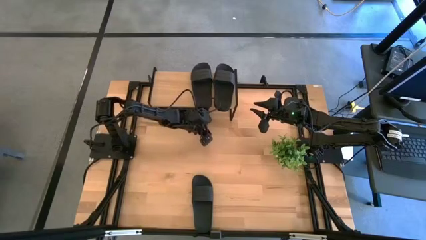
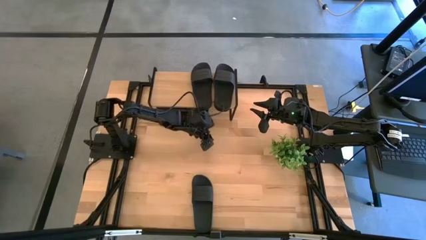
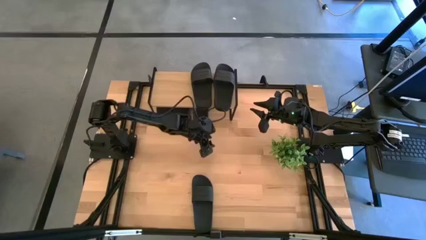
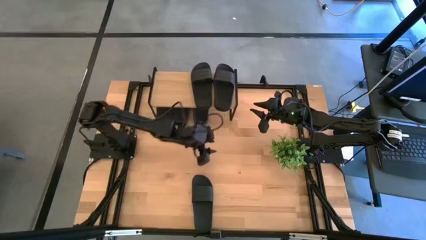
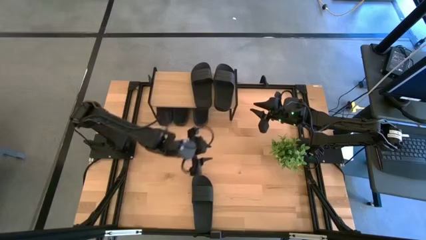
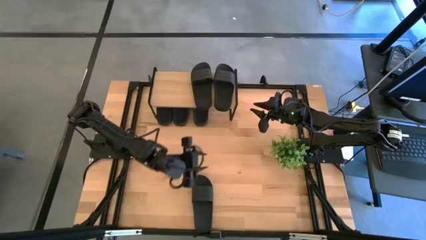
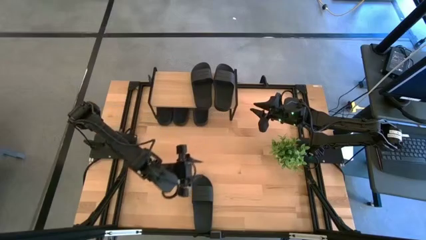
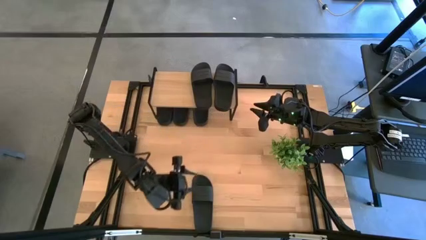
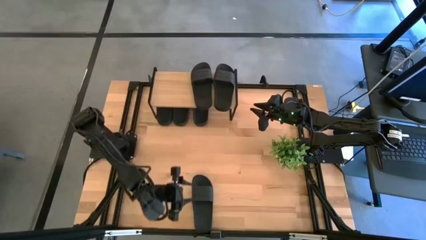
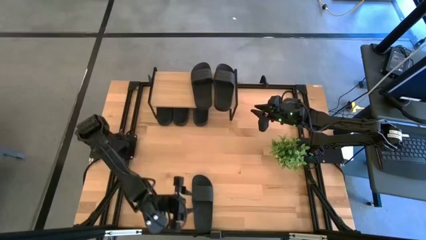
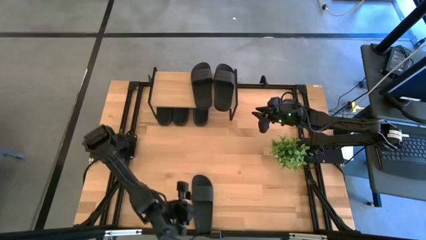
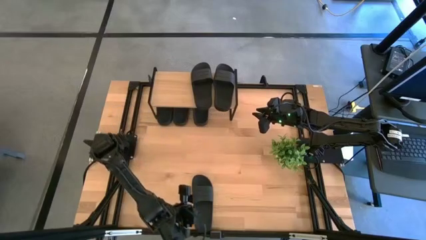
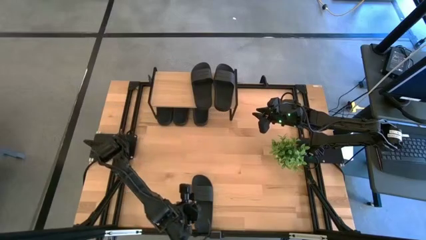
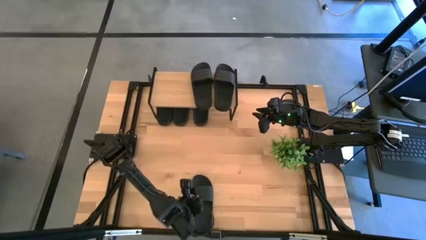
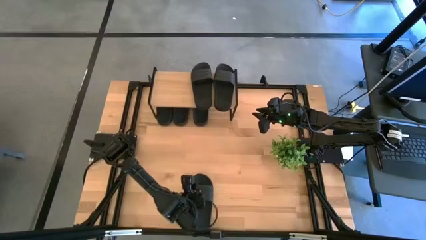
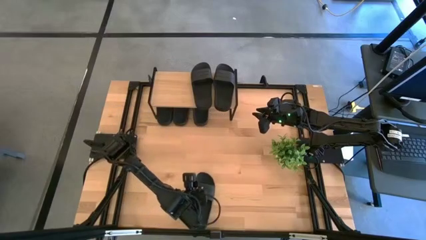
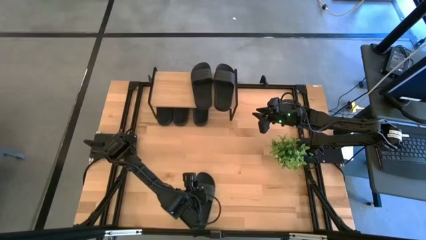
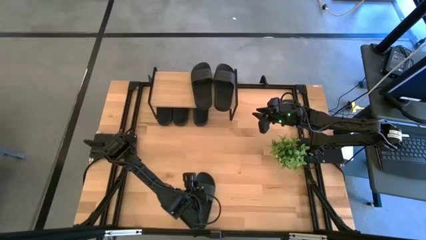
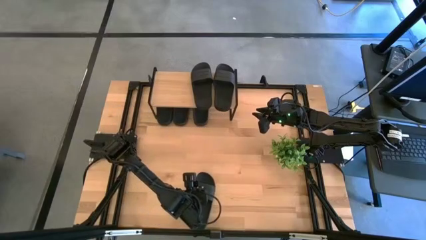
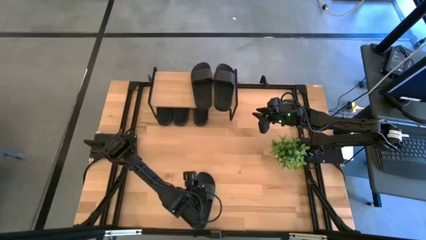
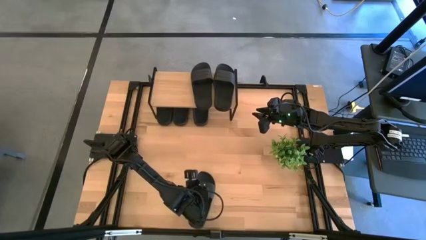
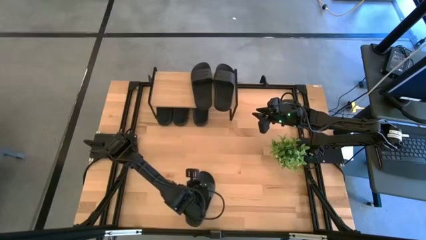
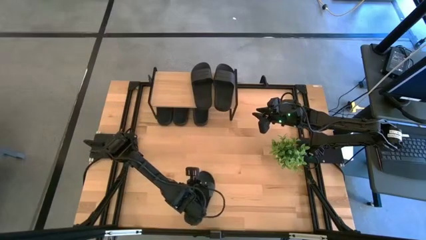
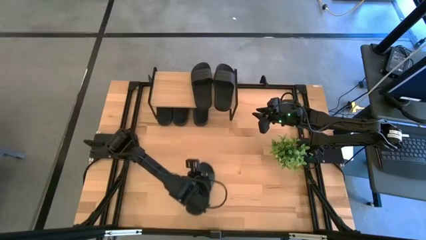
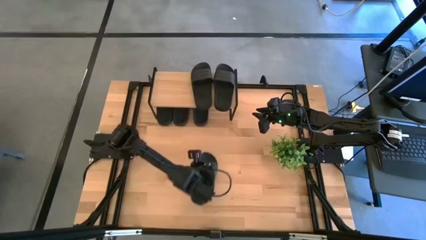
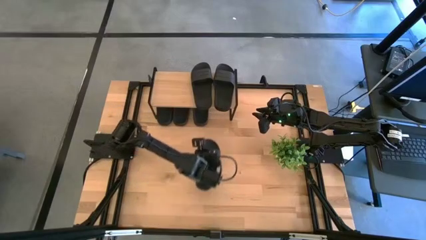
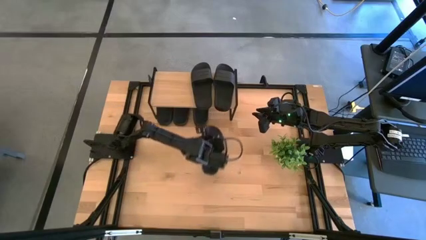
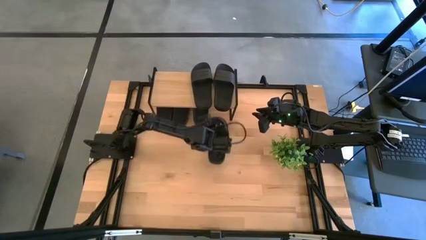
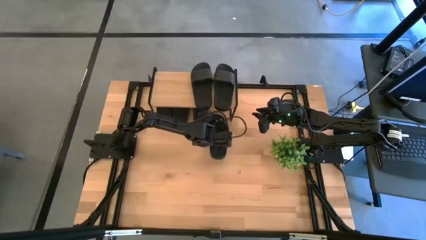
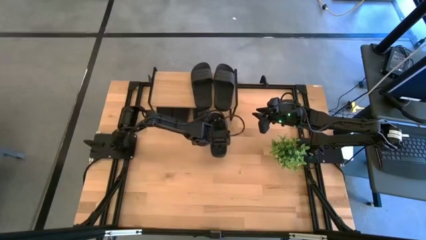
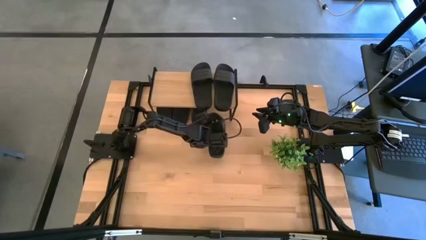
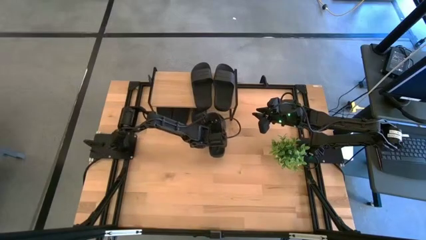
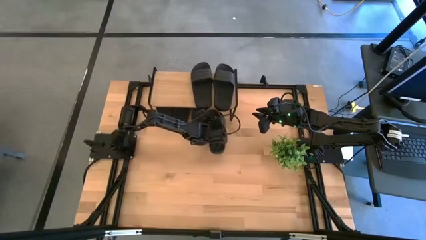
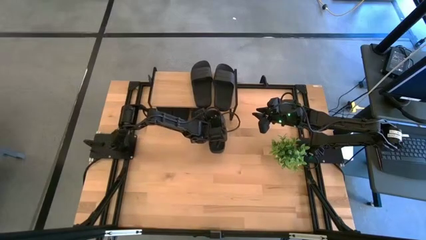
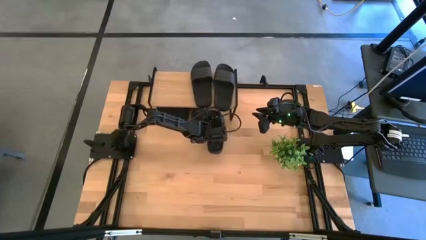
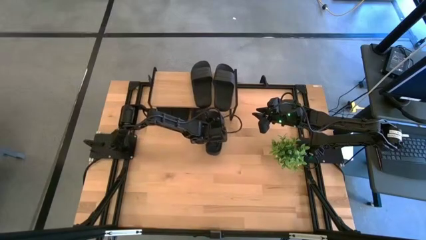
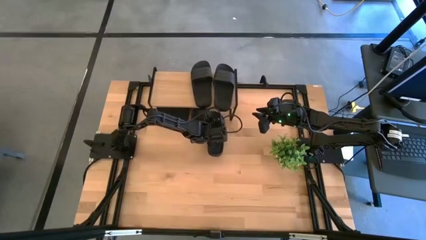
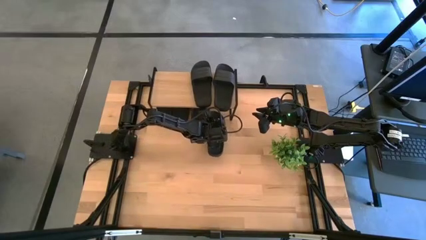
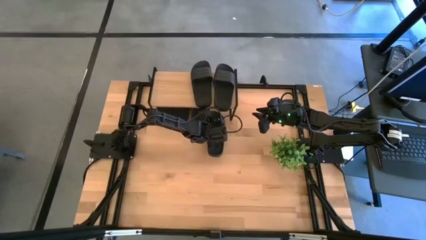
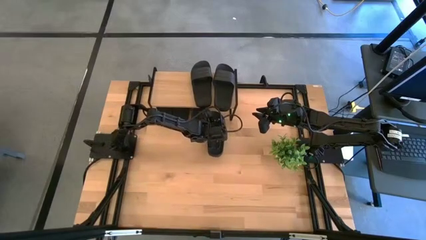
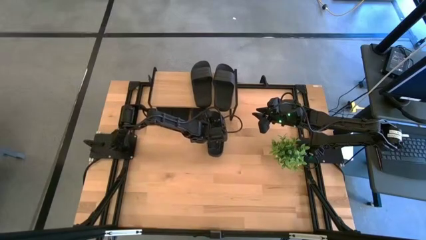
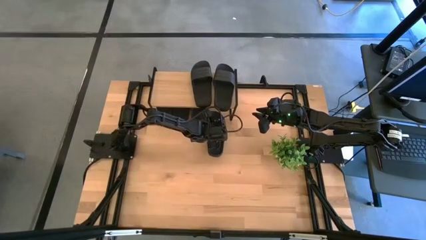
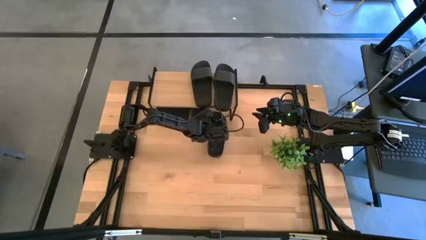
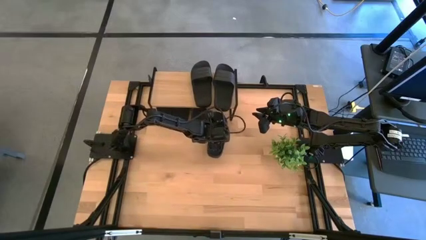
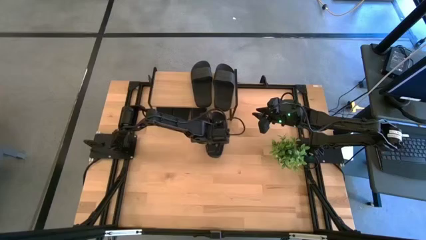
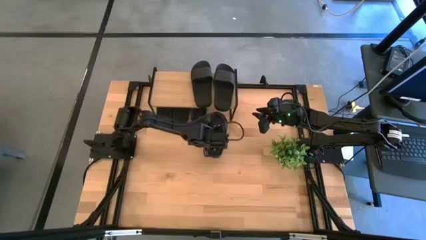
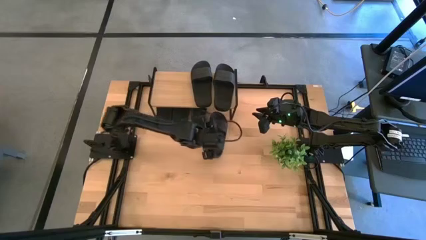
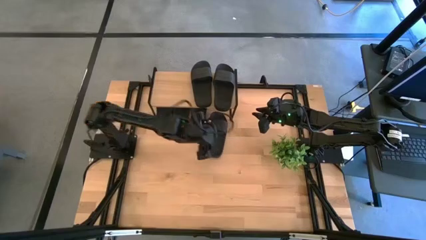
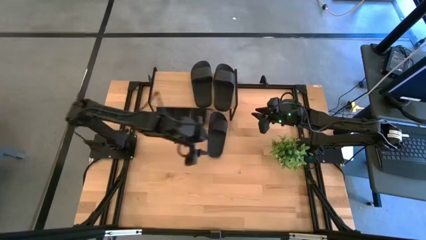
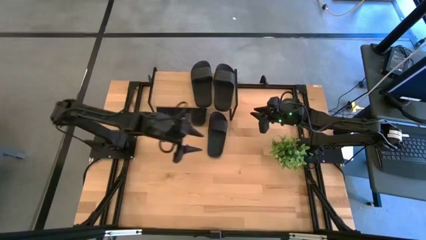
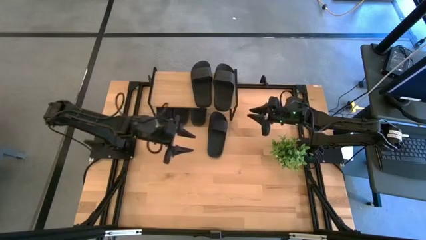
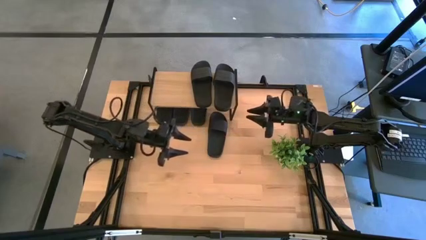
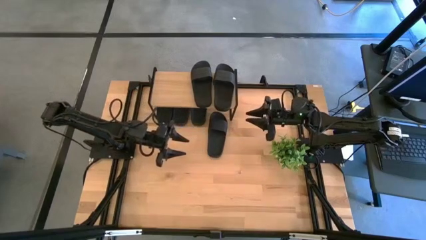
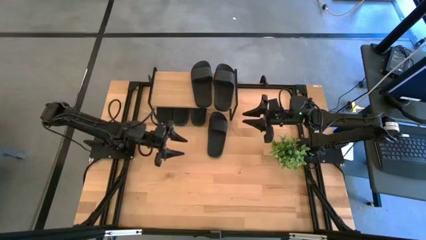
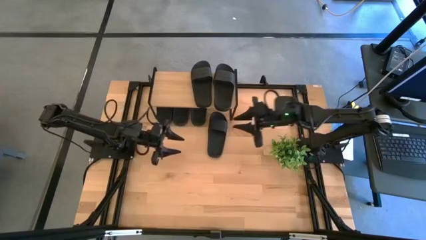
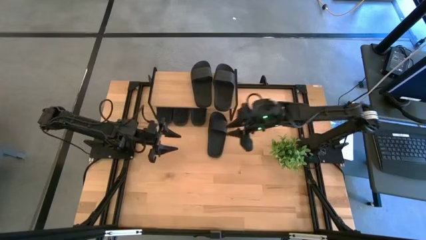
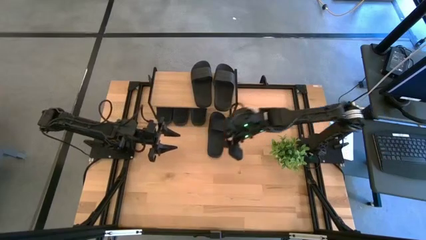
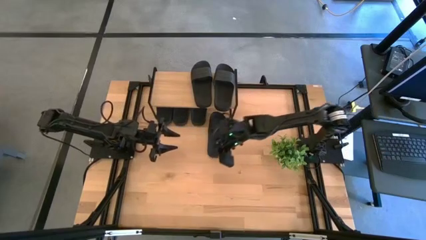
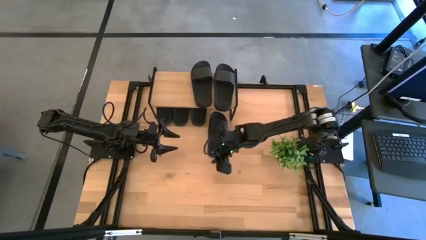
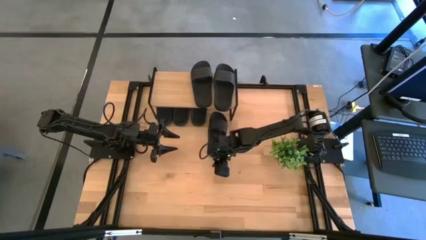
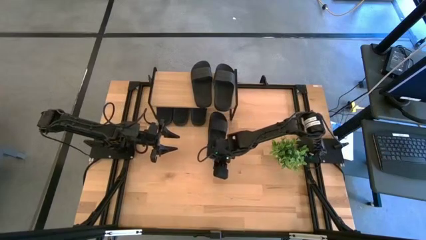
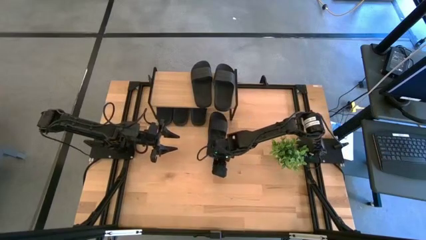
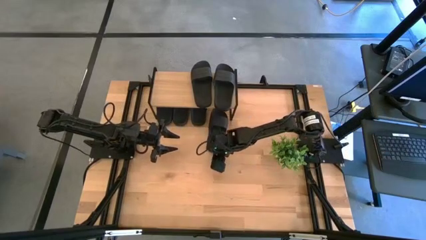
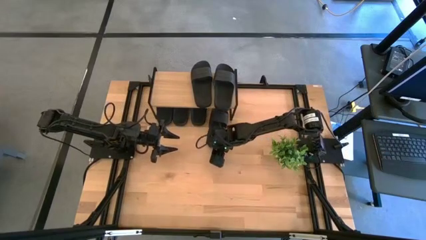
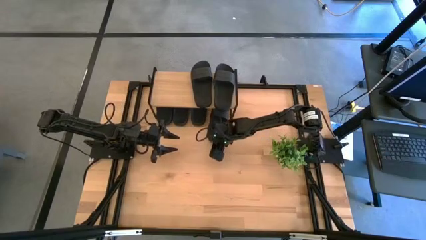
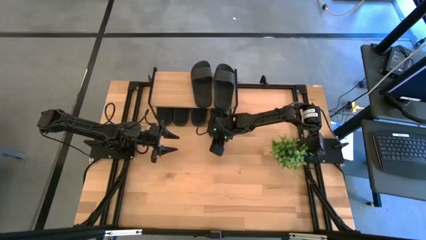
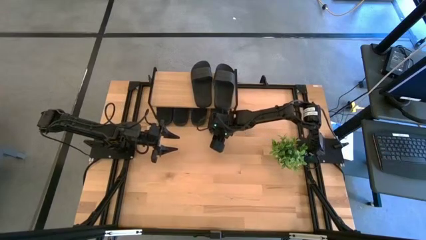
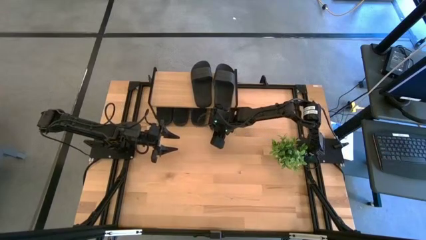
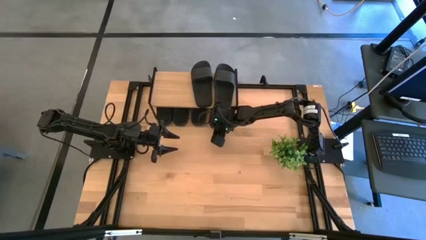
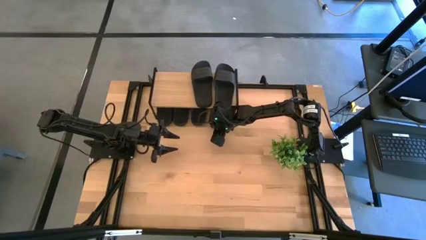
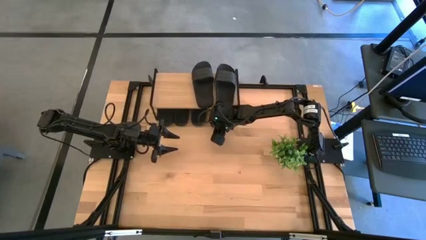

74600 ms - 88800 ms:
Task: Pick and place slides into the shelf
Put the black slipper under the shelf

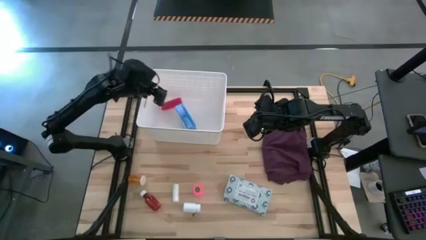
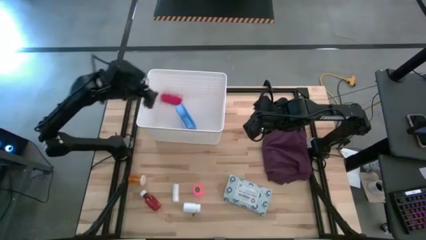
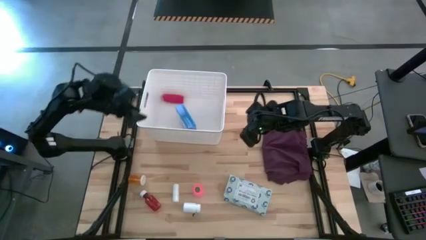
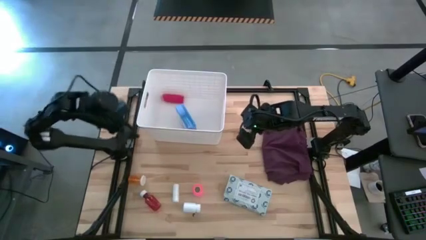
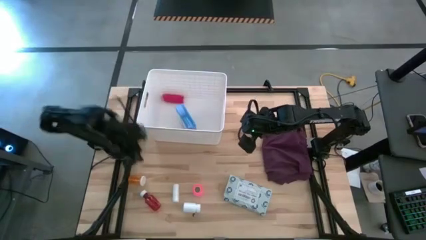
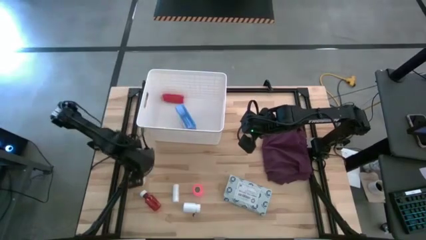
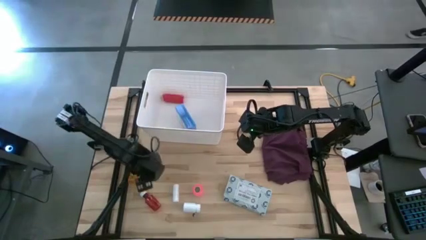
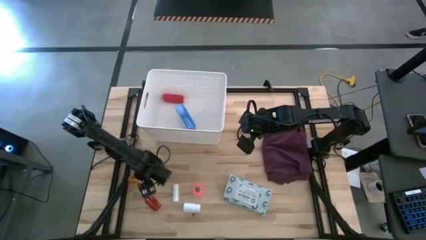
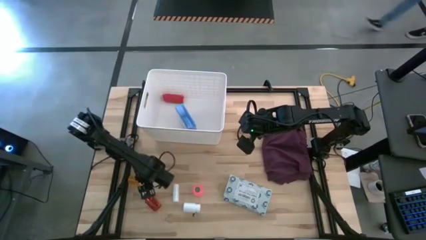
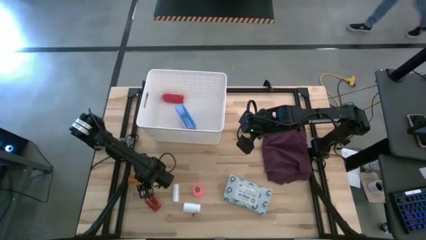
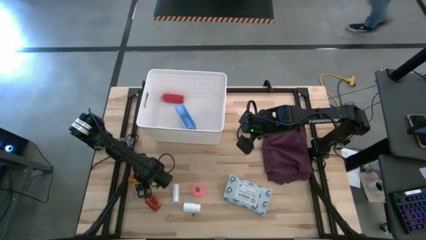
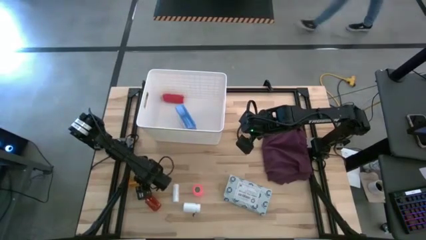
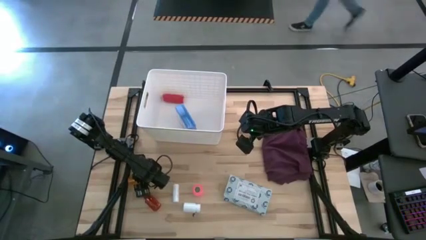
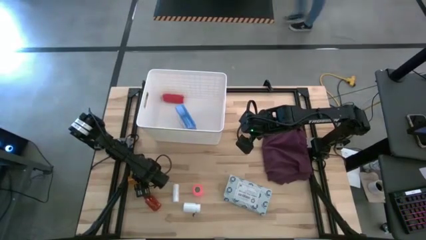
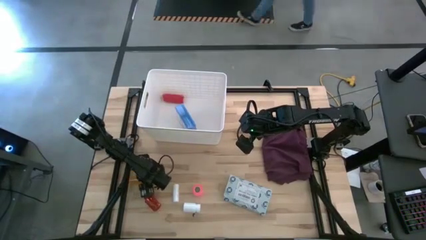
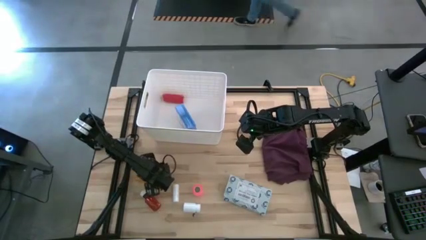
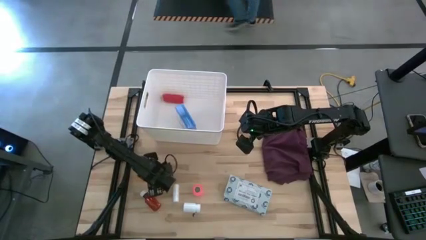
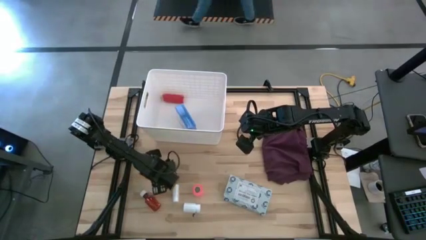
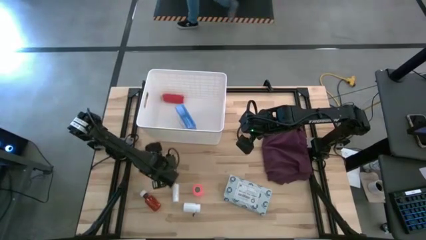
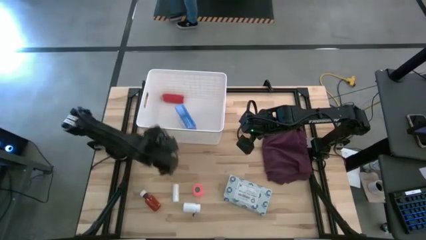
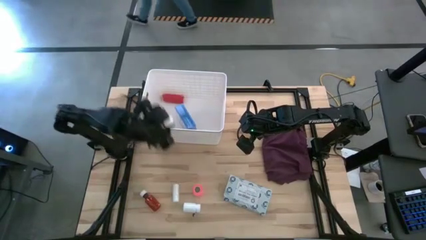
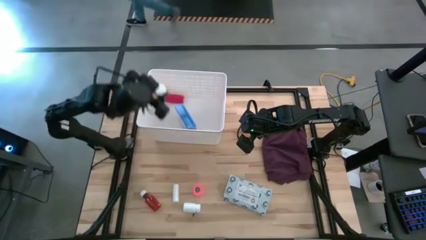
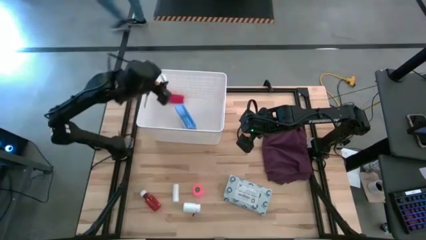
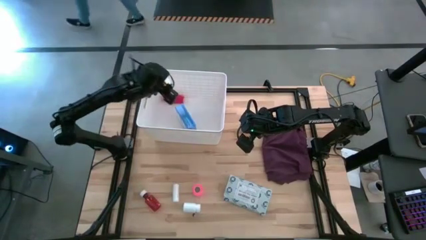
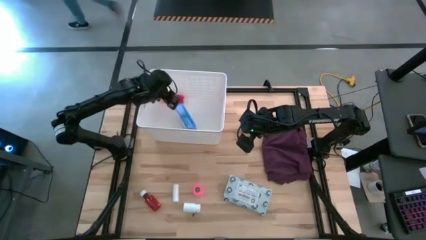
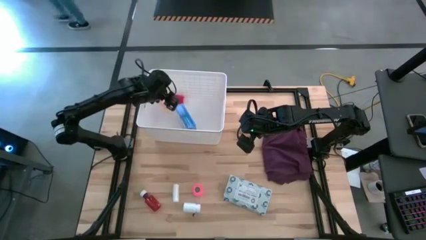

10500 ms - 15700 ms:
Task: Pick & place medical supplies in basket/bin
Put the orange pill bottle into the white bin
